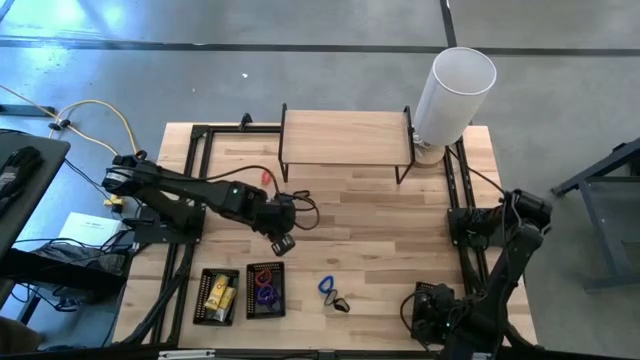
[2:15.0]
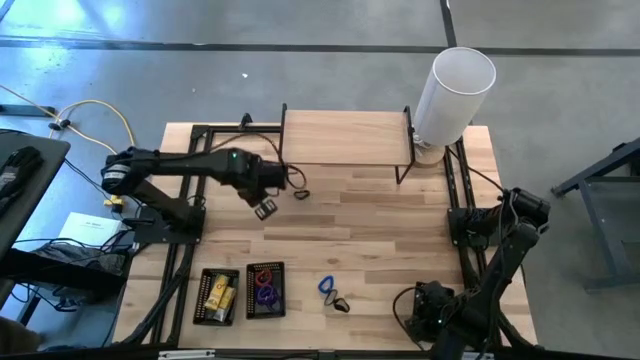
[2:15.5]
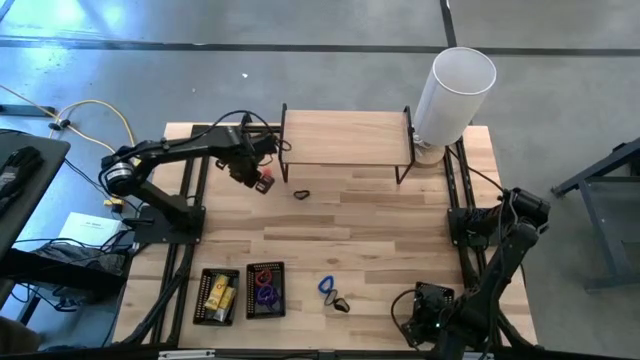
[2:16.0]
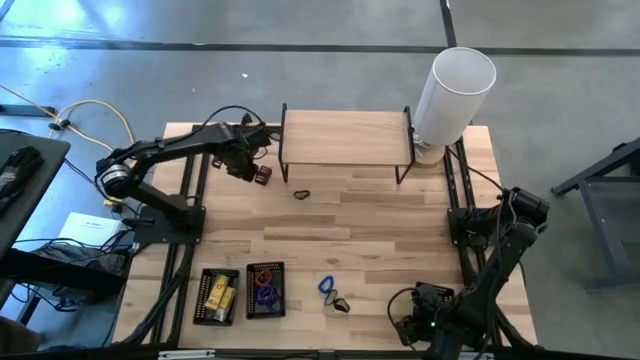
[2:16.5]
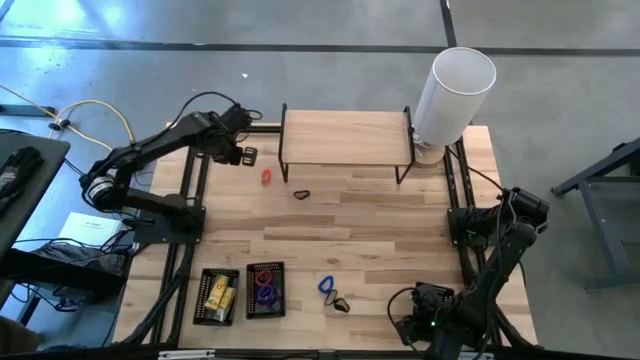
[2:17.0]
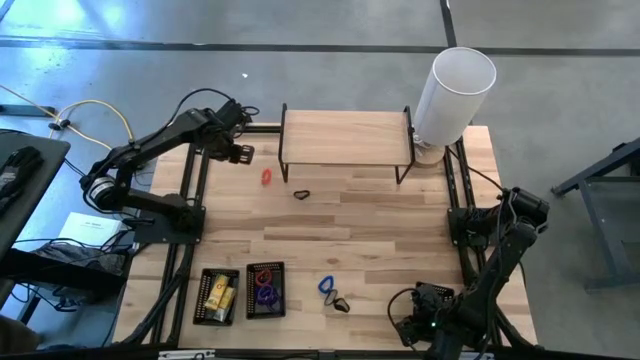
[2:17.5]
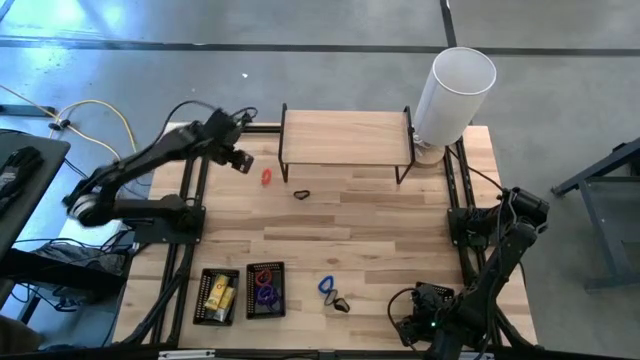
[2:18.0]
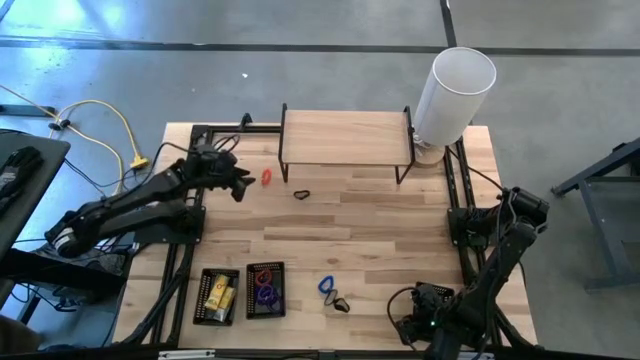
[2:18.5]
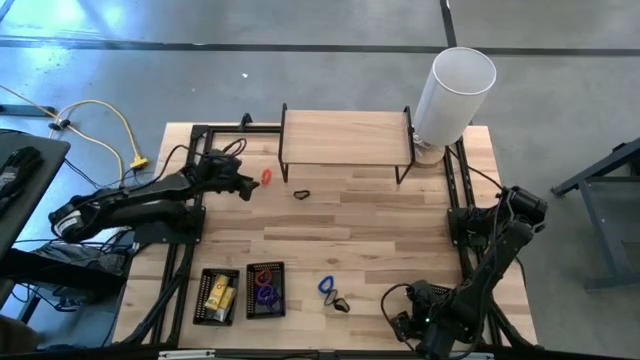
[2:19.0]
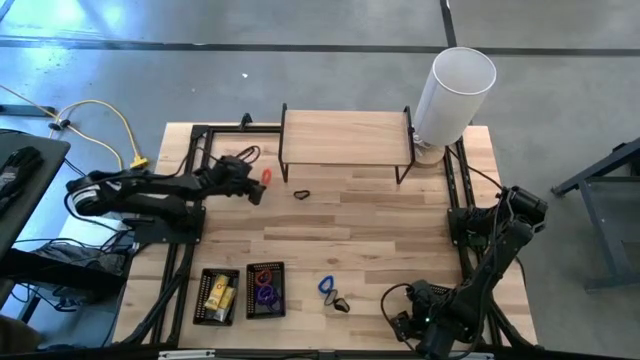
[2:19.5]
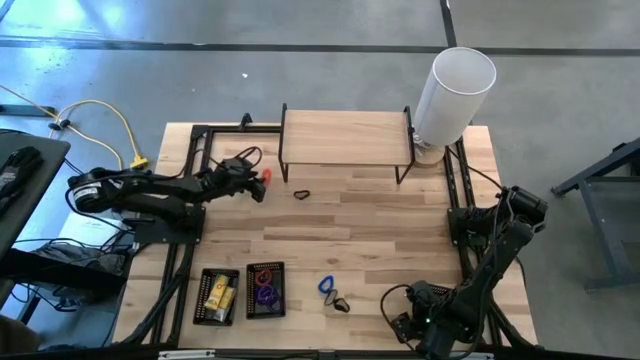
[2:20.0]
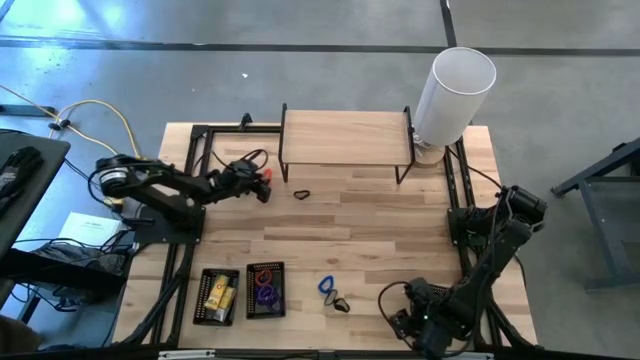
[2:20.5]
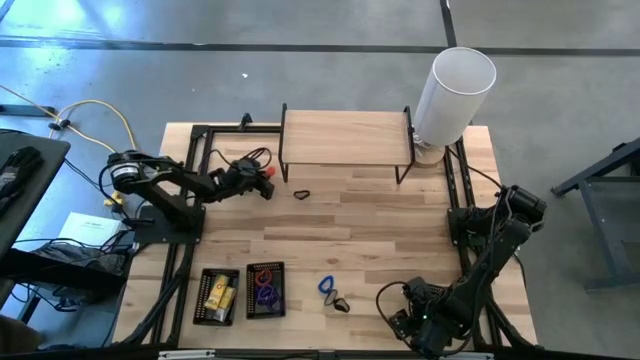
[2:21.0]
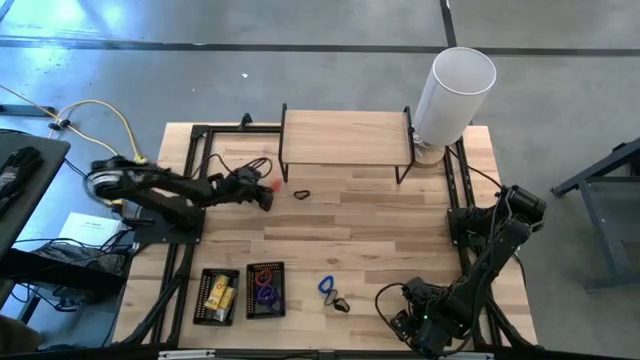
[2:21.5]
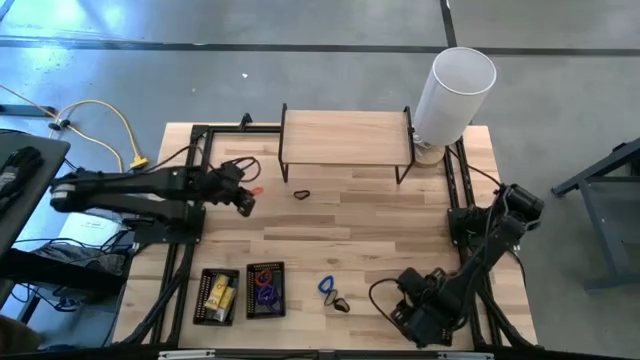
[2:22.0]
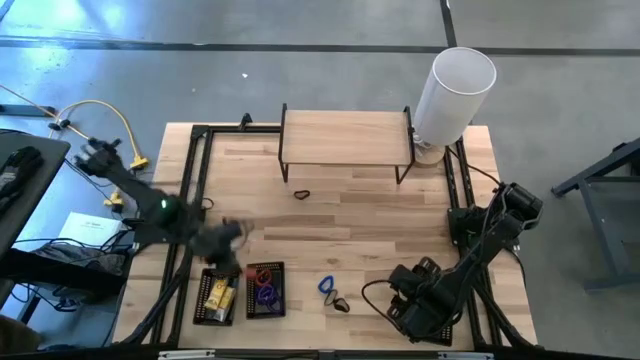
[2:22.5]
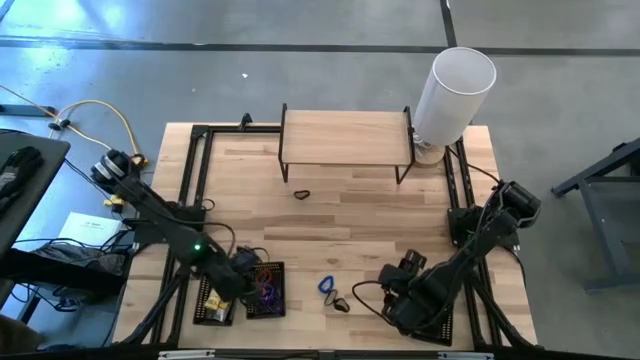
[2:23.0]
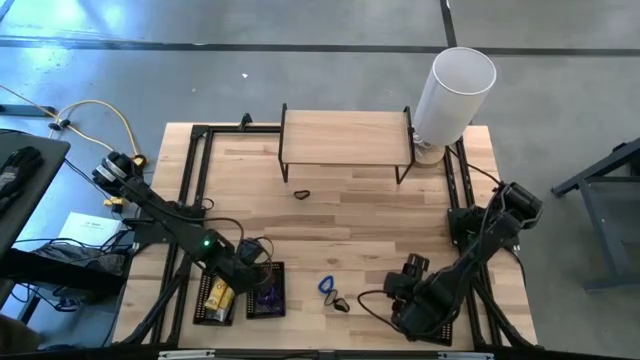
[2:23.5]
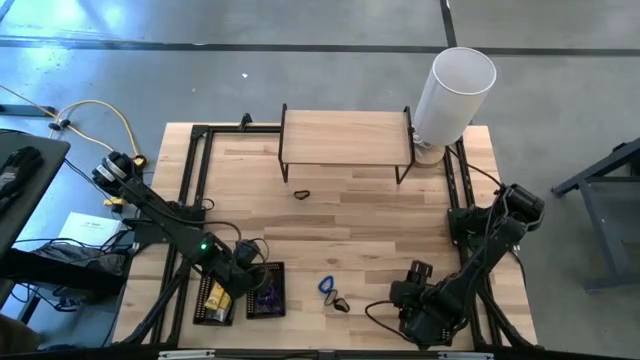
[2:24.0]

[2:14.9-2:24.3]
Task: Pick & Place Office Desk Supplies
Put the orange spring key chain into the middle black basket

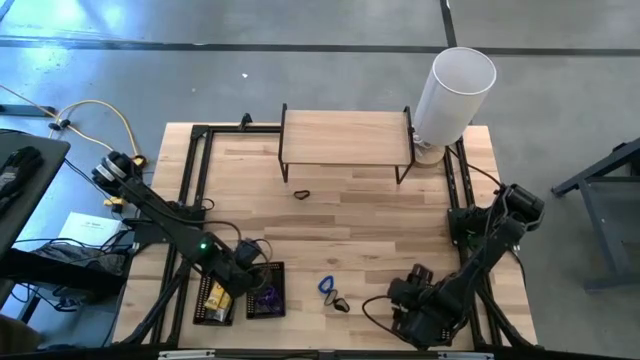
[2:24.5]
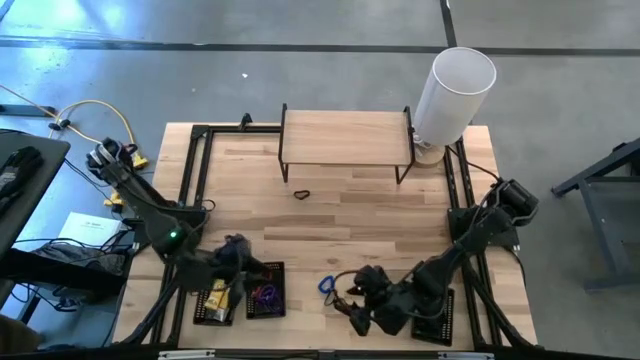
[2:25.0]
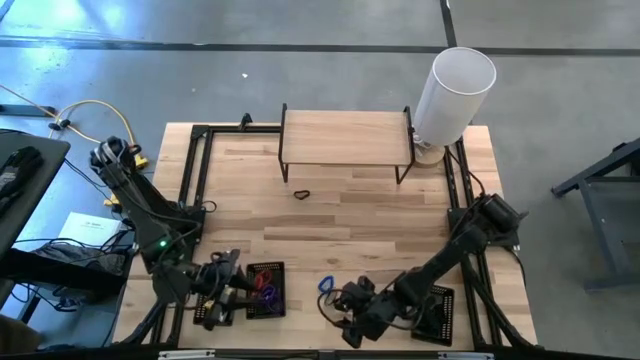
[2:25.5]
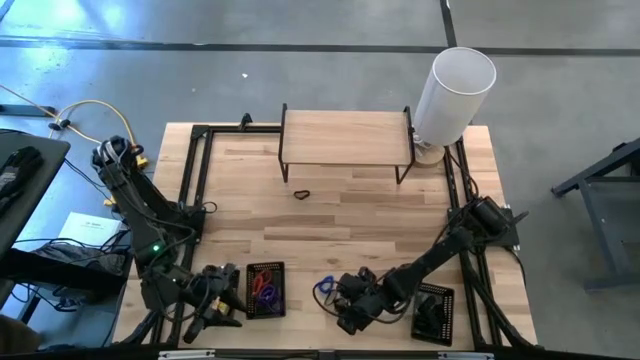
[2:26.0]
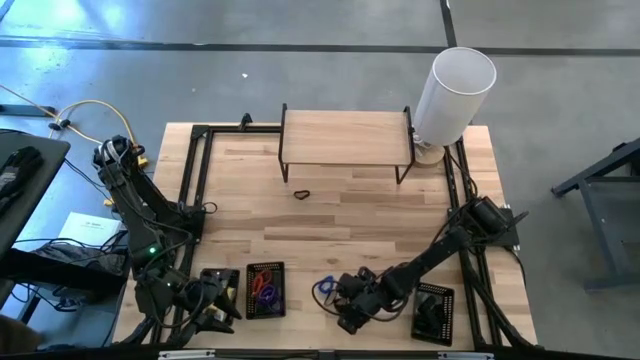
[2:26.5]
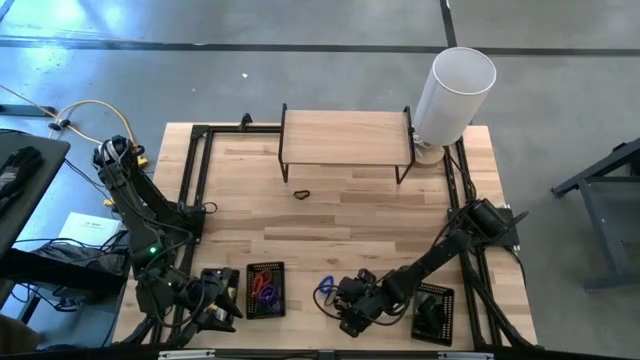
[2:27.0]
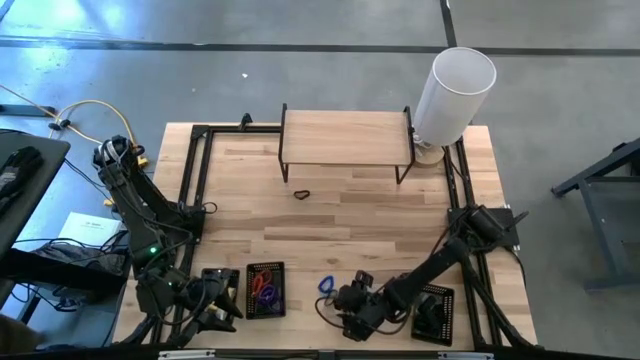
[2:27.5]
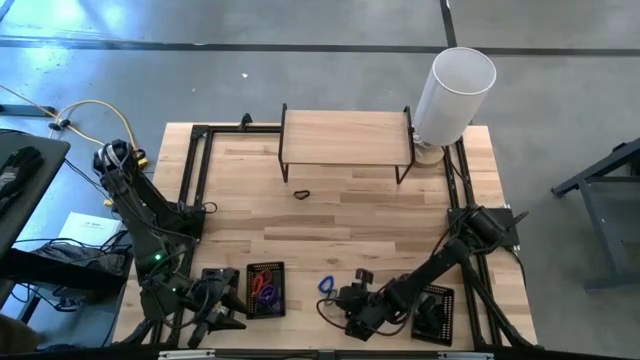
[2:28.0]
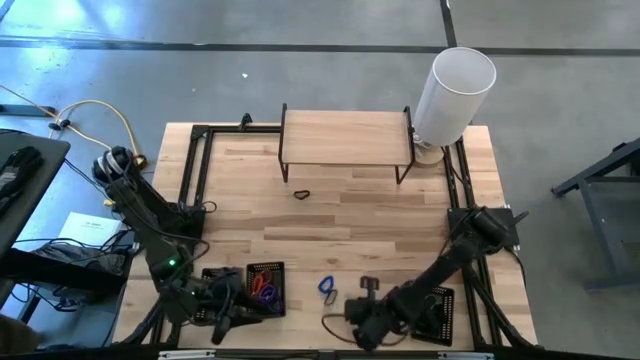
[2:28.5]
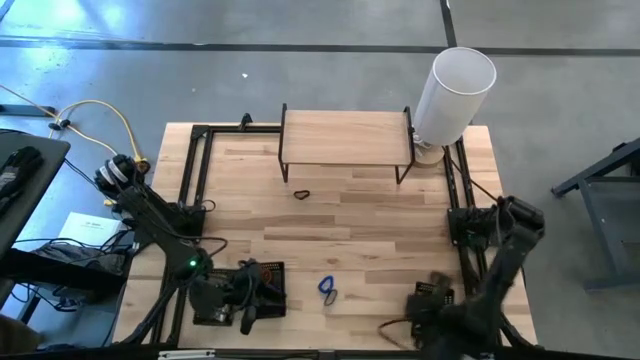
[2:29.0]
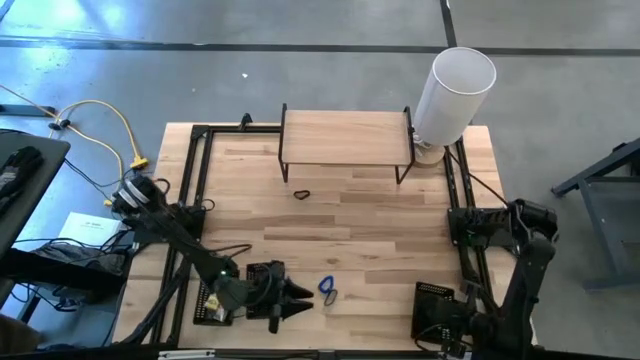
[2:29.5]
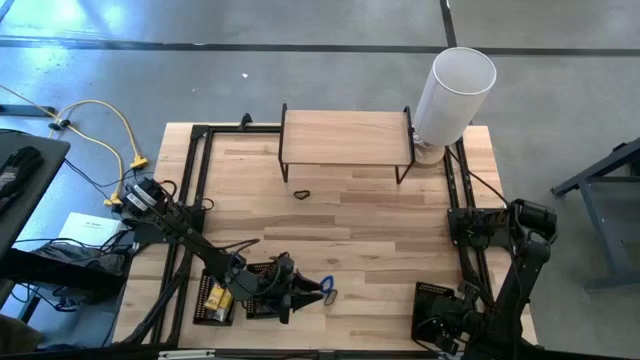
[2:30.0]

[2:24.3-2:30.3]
Put the black rubber band into the right black basket

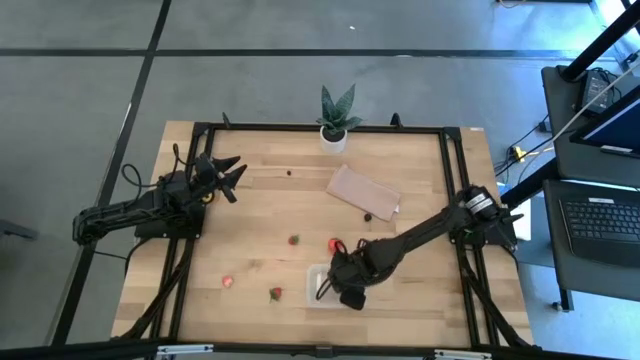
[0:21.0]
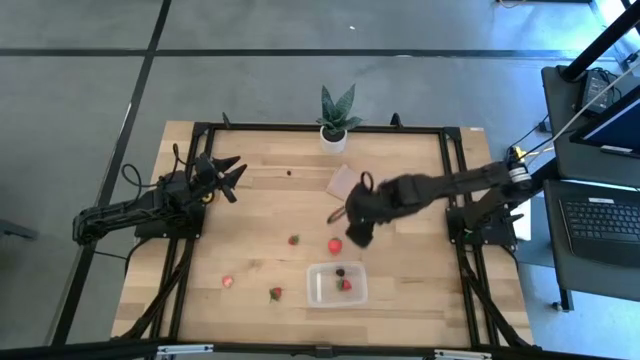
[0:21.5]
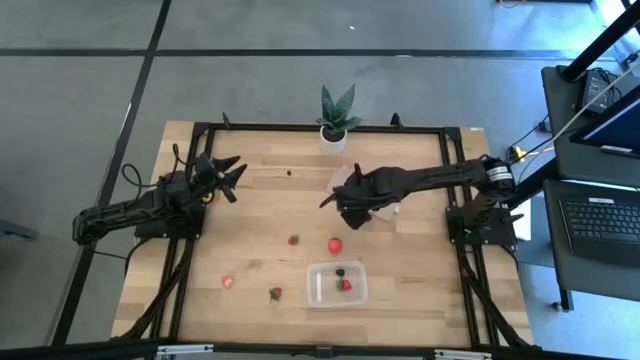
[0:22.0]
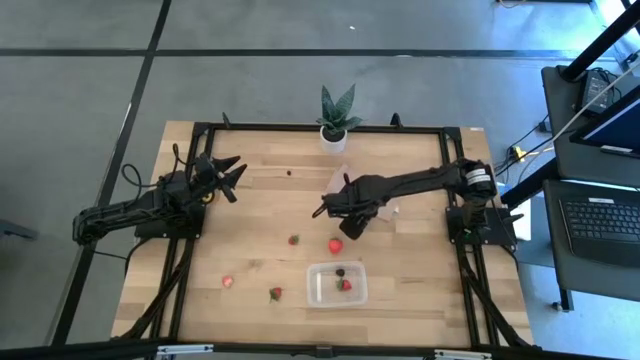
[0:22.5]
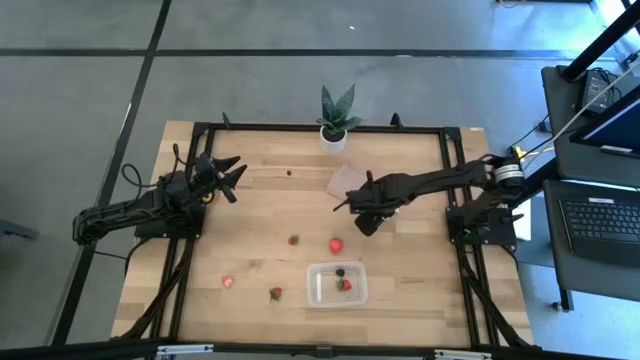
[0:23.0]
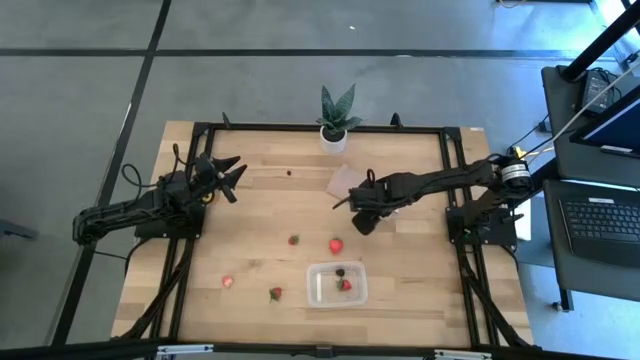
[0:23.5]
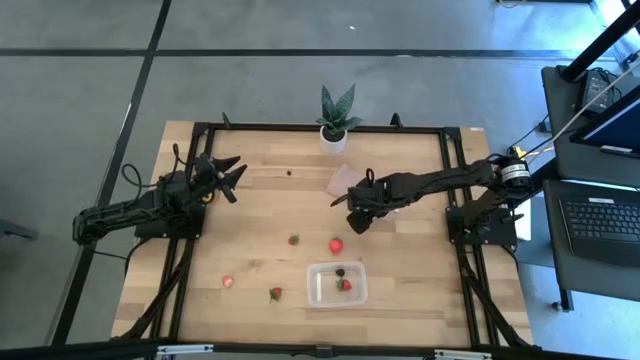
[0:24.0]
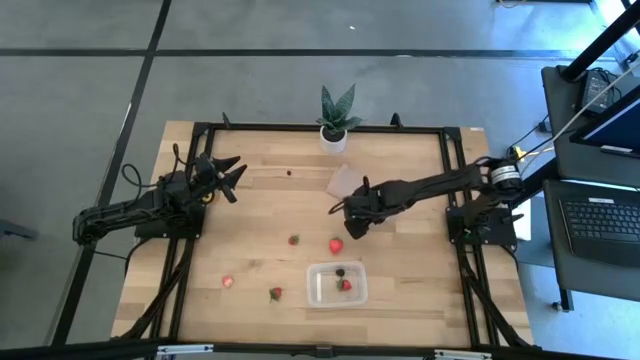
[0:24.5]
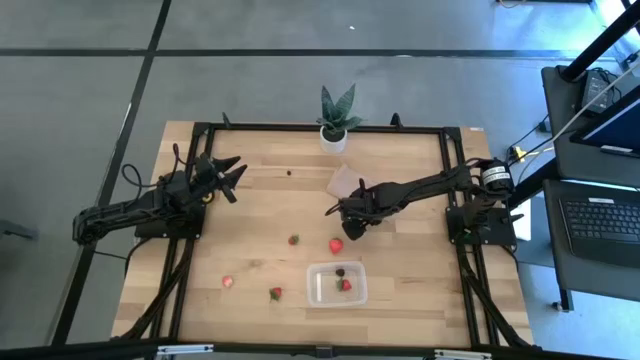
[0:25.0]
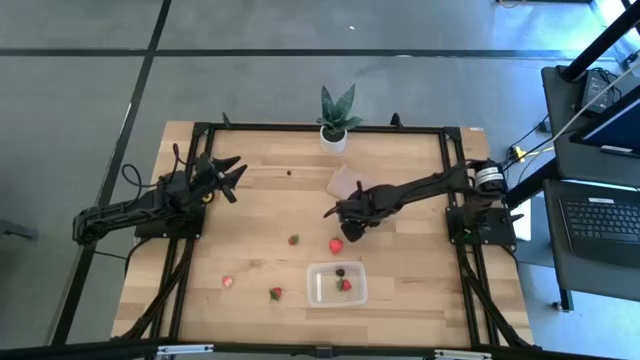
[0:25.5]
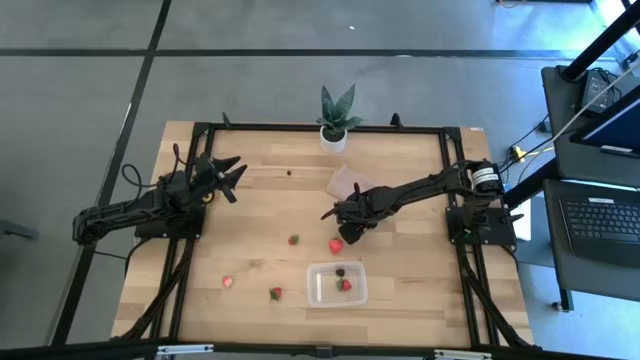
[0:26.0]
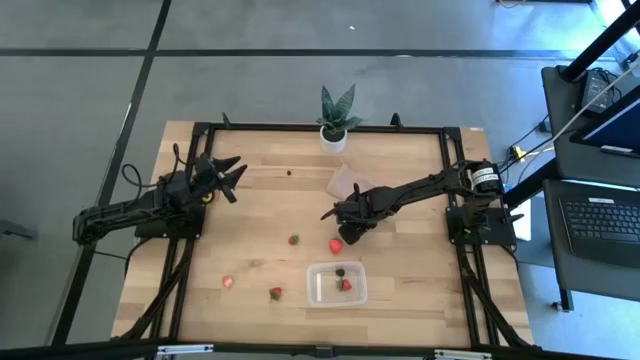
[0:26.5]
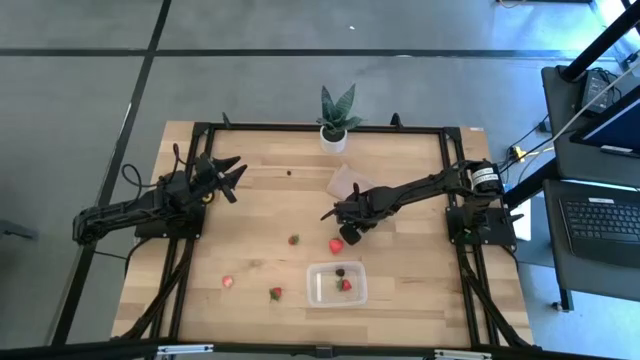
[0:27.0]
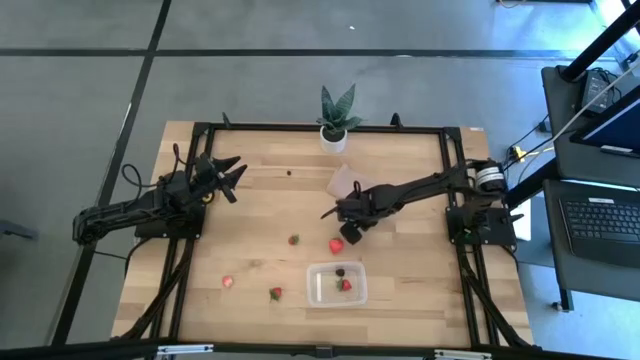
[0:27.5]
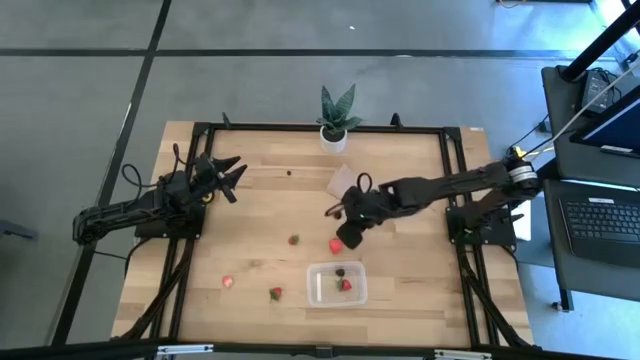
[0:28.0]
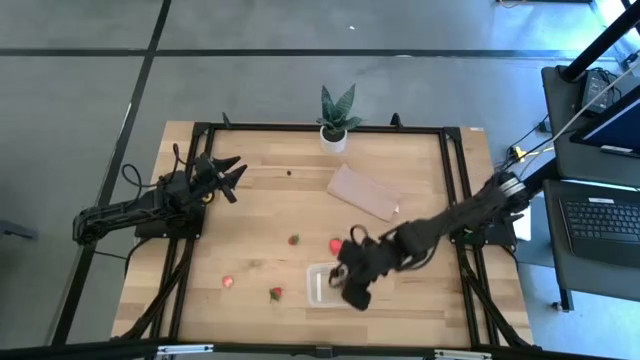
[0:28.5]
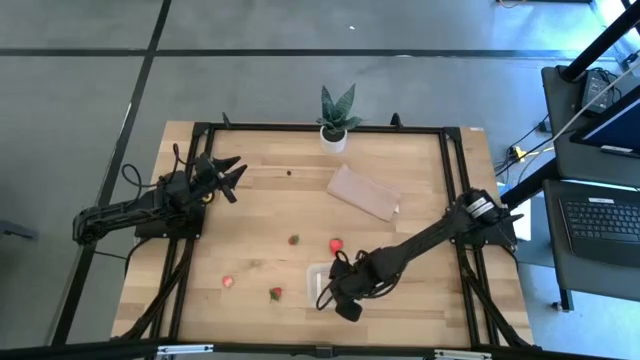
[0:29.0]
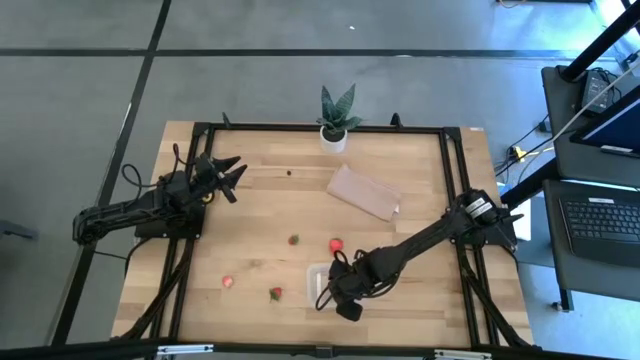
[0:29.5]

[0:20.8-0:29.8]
Task: Pick and placing Produce into tupperware
Put the black cherry in the bin
